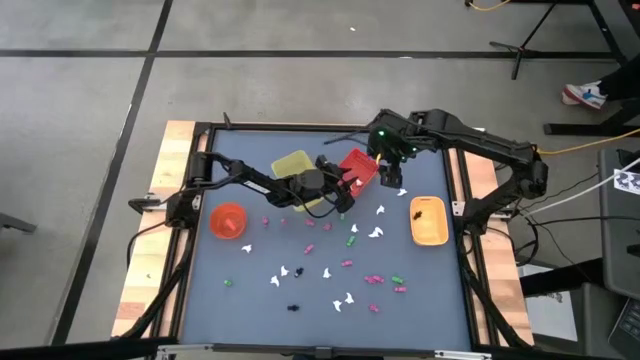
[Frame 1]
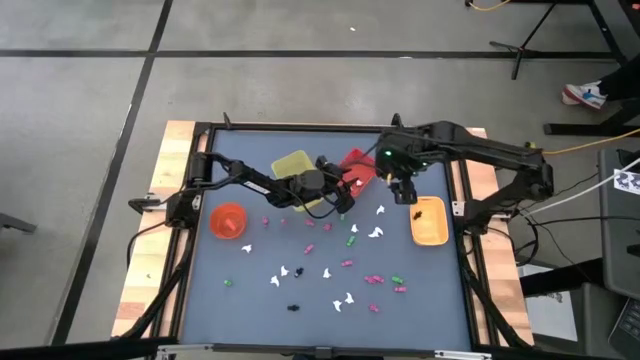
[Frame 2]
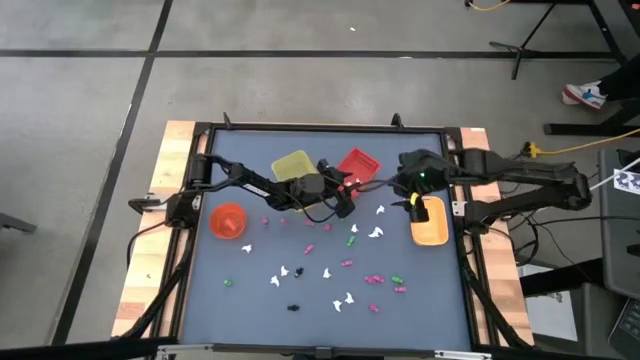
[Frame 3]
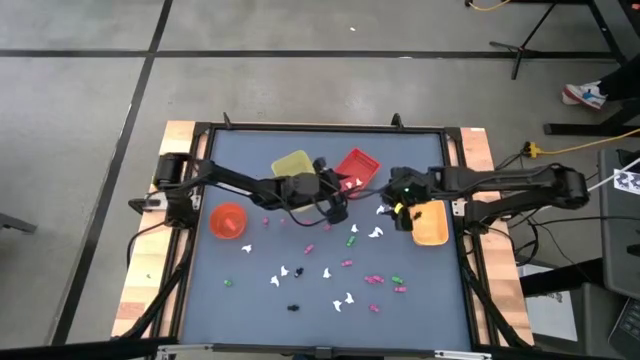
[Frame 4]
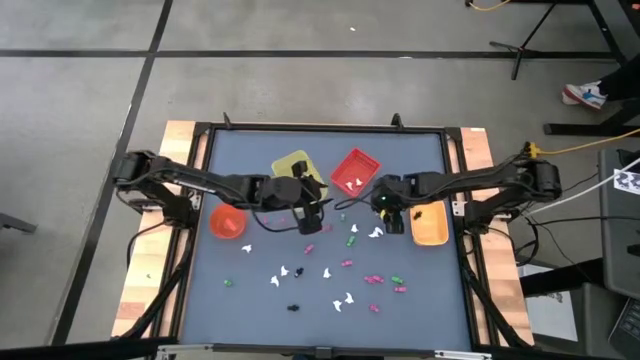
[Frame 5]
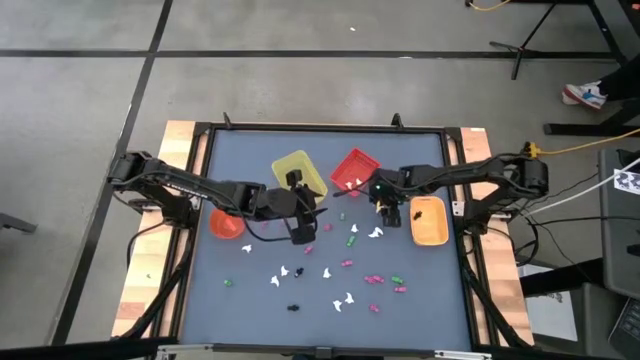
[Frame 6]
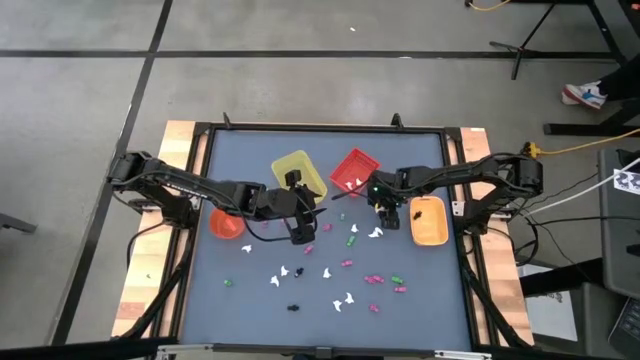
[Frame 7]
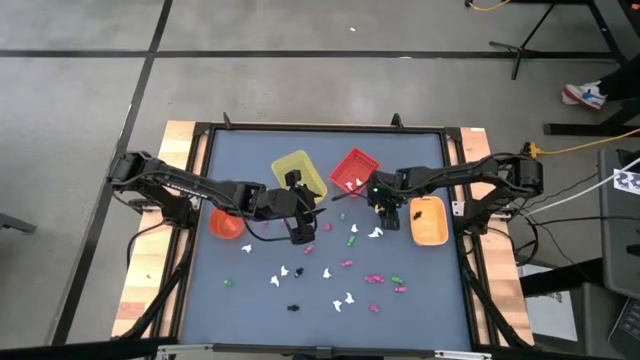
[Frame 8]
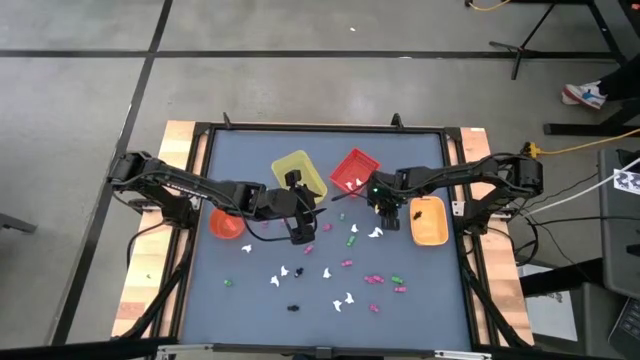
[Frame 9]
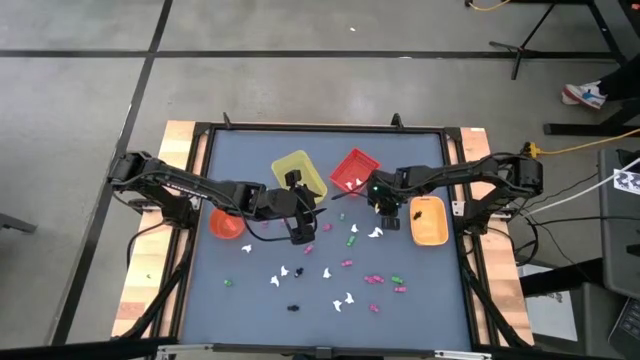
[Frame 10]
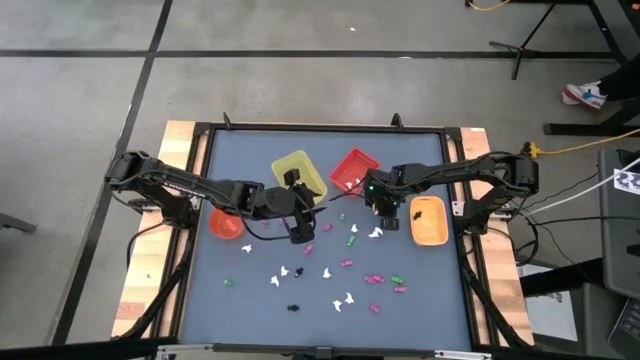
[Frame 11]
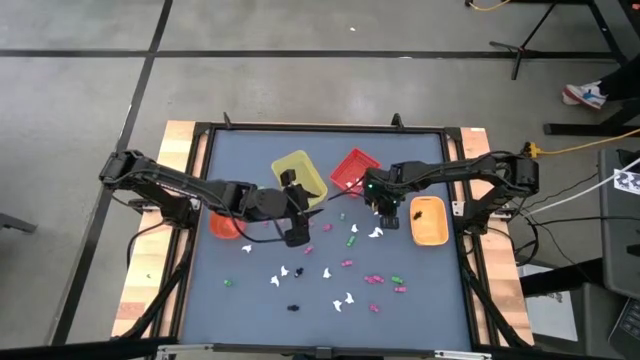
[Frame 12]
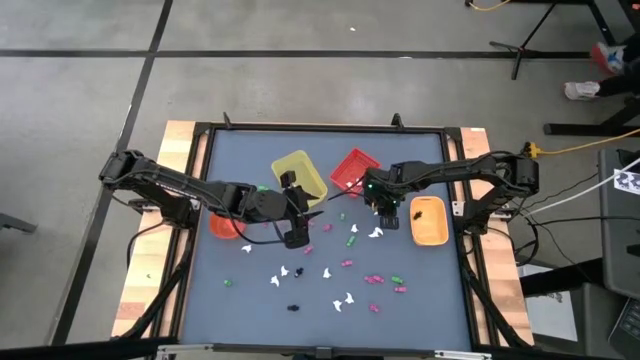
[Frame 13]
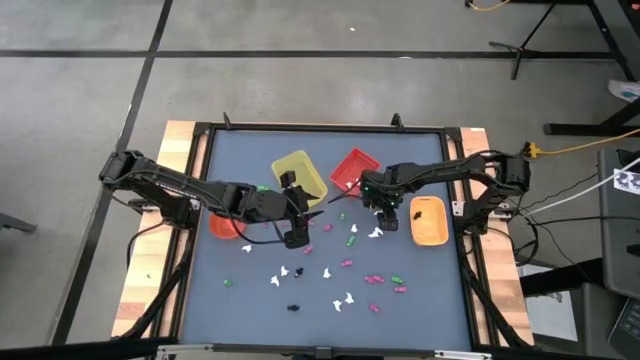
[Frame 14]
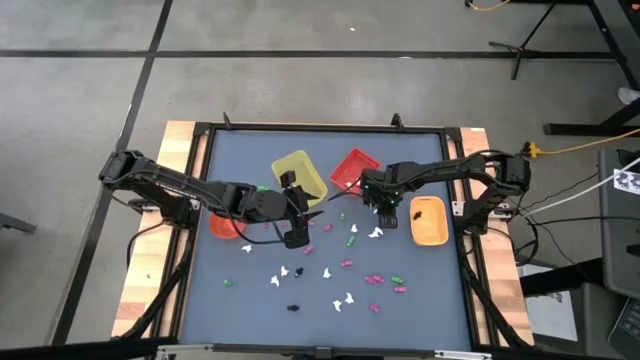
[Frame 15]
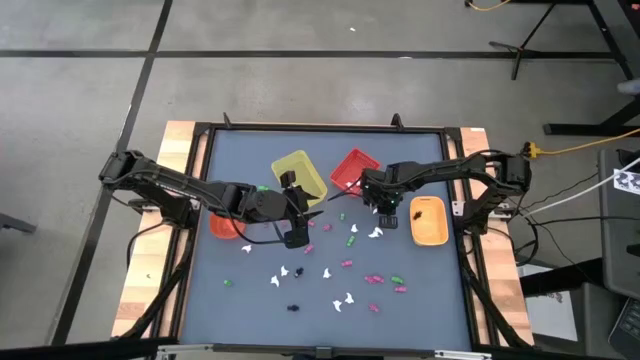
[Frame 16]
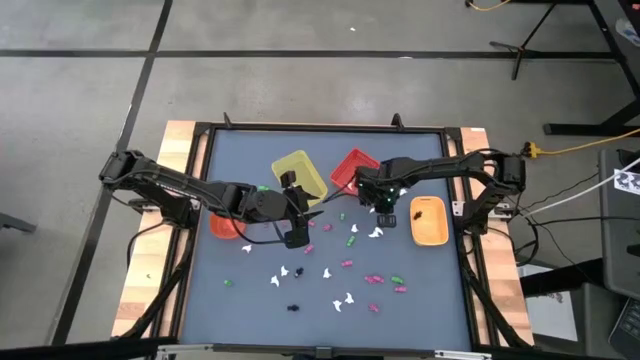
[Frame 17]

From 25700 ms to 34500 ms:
Task: Sort Halloween decoration
Put the white ghost toy into the red bin

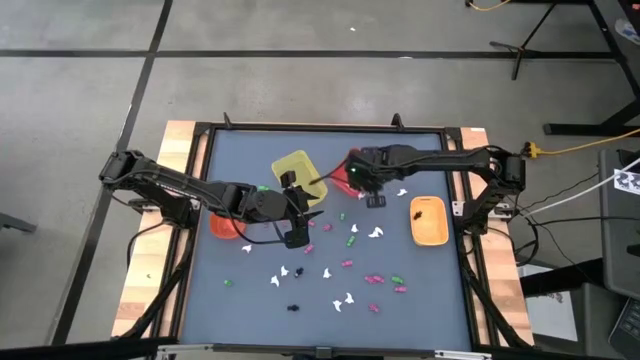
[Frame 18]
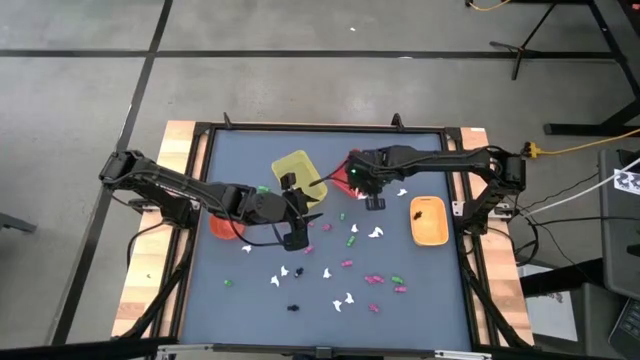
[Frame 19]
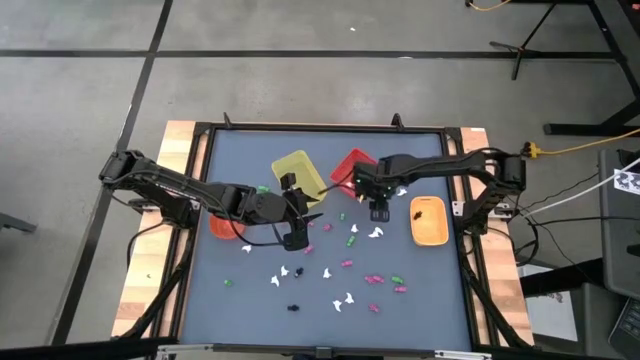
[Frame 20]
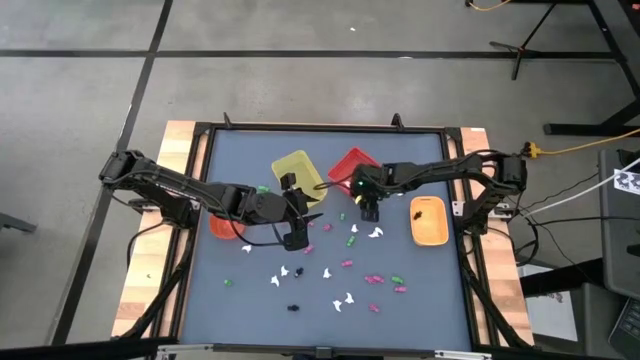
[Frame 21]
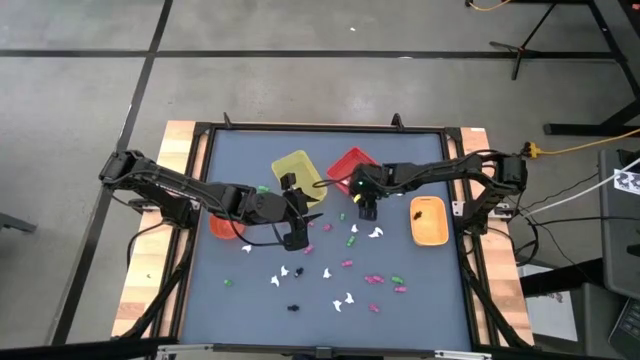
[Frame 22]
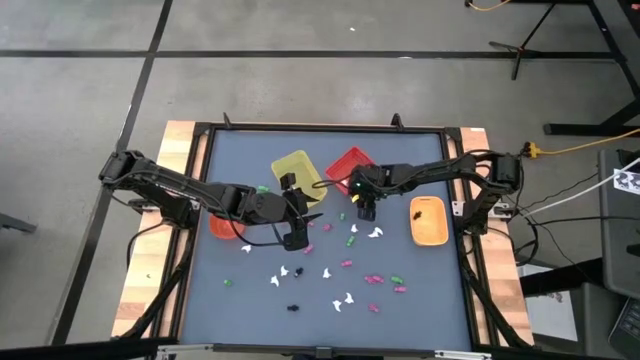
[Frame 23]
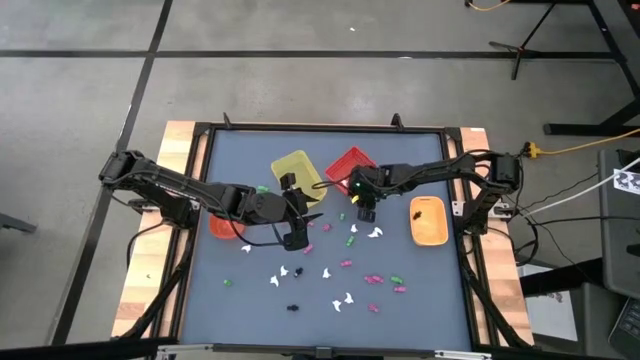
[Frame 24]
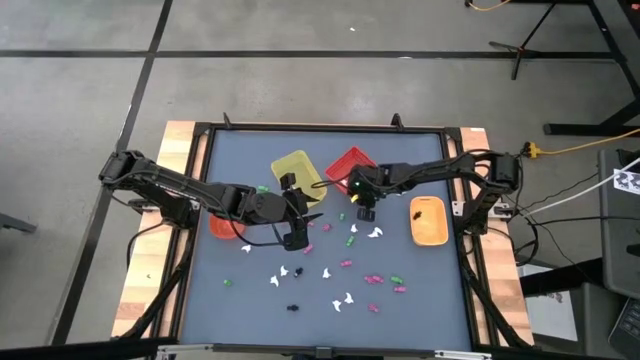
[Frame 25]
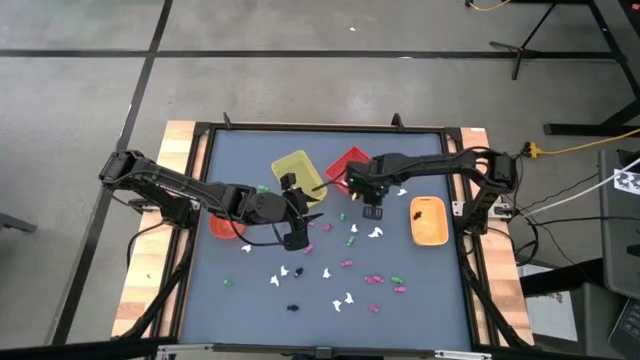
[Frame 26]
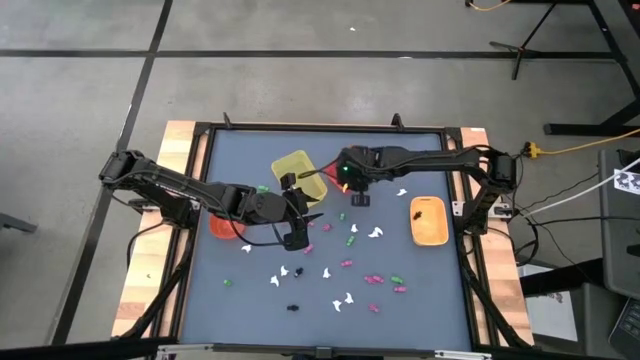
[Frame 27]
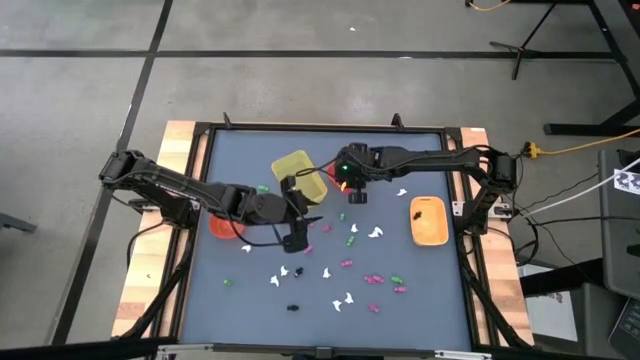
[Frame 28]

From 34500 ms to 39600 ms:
Put the white ghost toy into the red bin

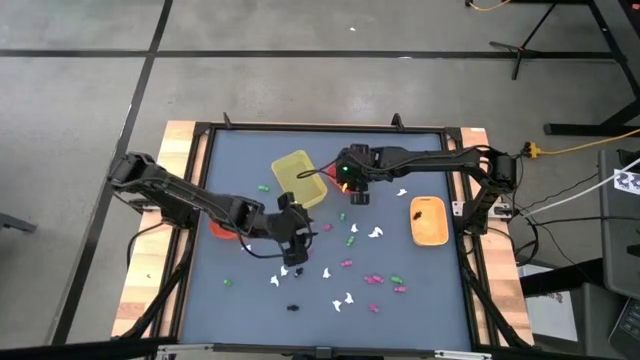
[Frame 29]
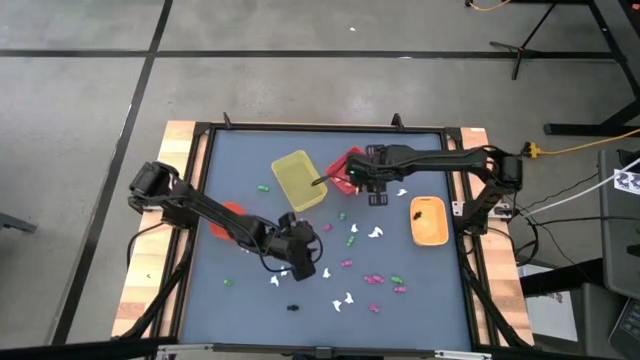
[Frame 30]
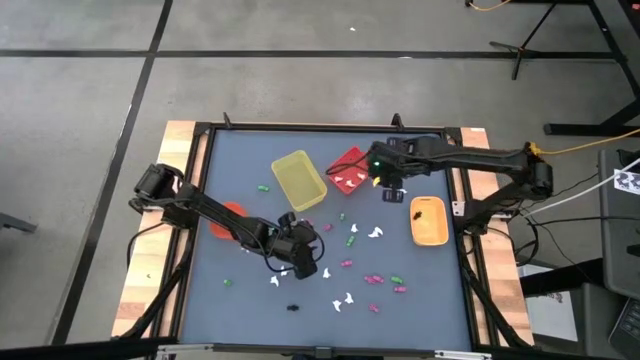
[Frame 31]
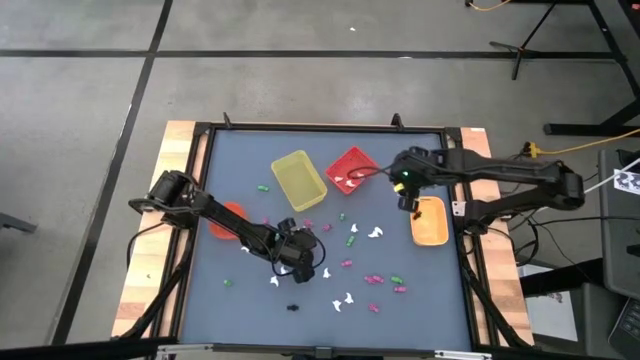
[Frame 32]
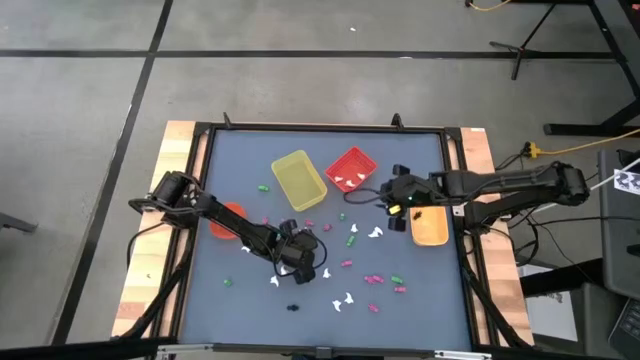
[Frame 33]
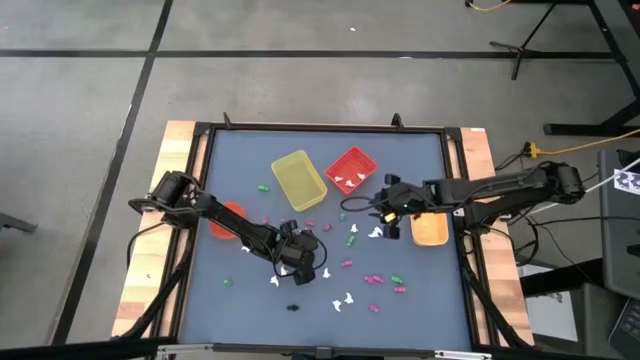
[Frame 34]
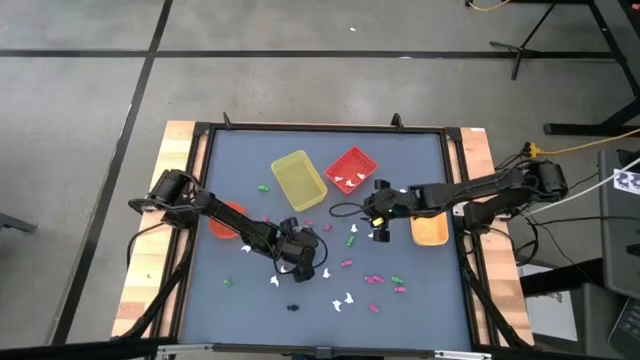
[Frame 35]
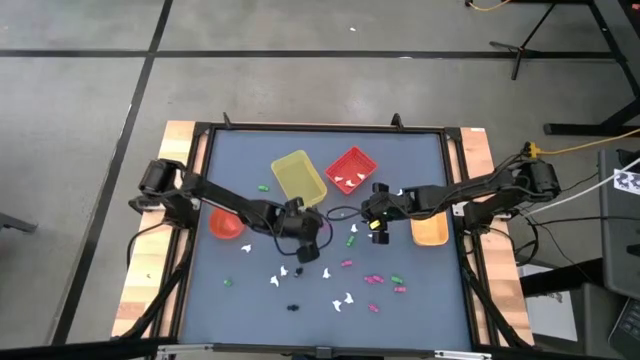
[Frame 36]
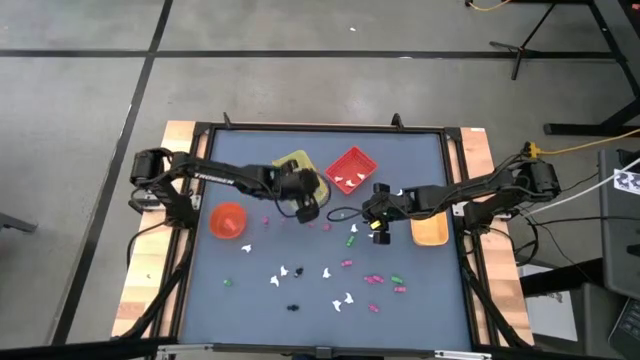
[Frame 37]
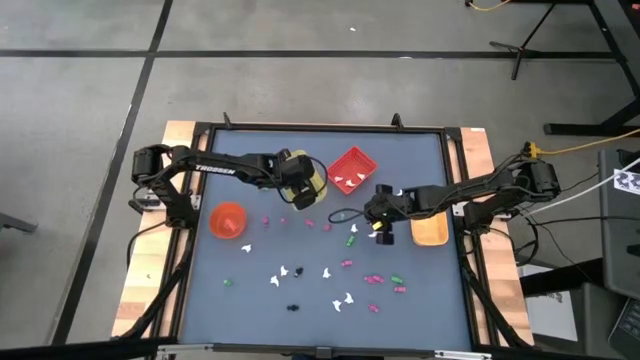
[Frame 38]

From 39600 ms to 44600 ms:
Put the pink skeleton toy into the yellow bin

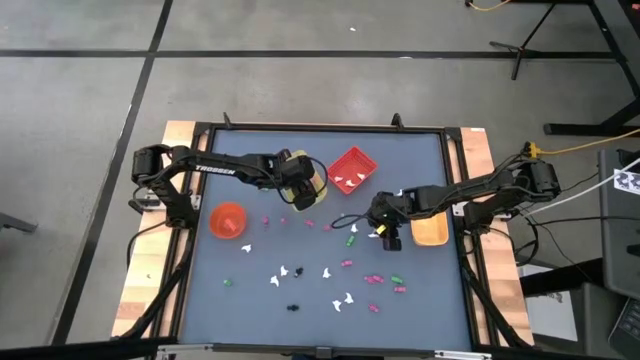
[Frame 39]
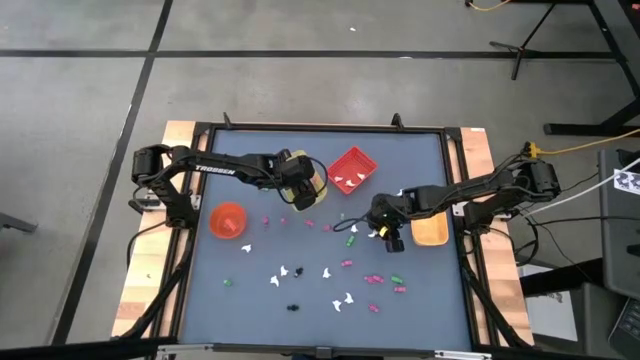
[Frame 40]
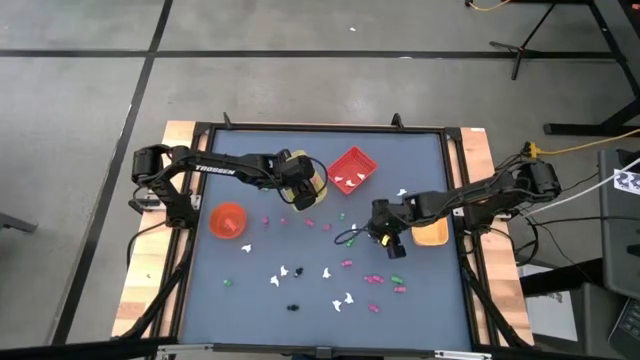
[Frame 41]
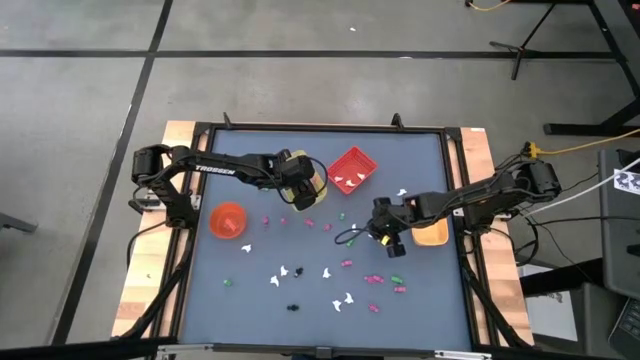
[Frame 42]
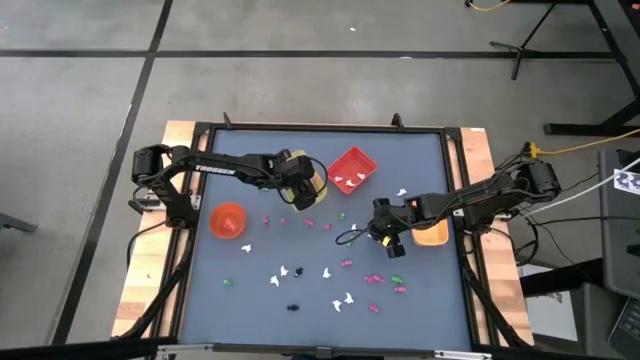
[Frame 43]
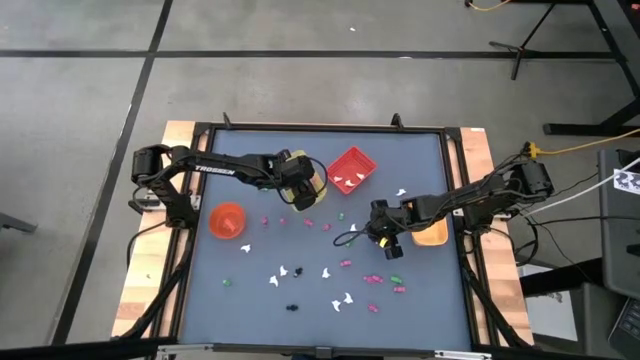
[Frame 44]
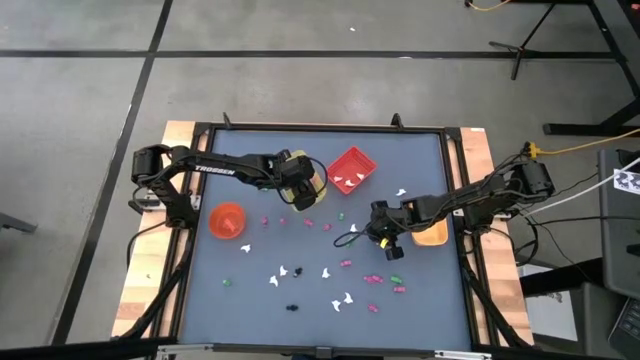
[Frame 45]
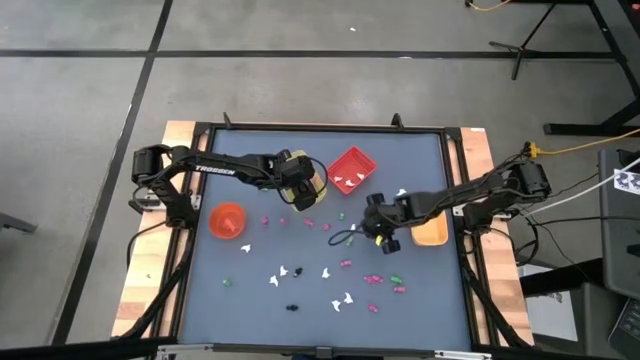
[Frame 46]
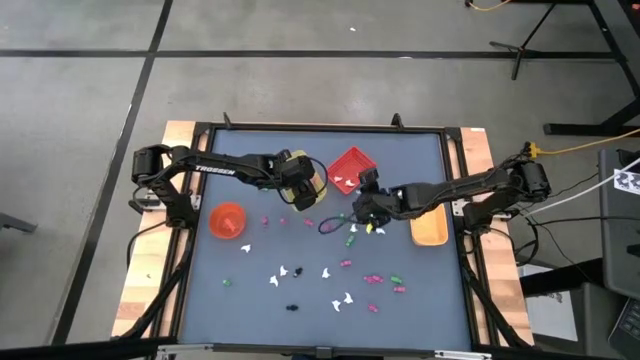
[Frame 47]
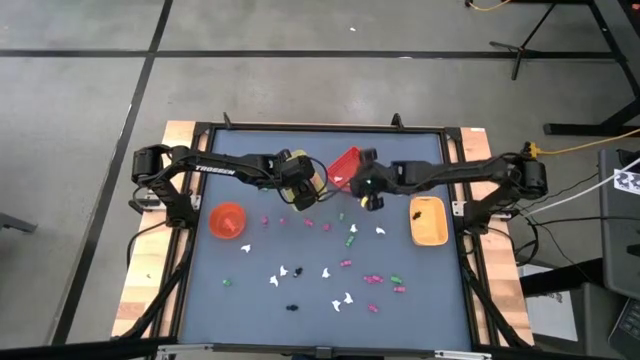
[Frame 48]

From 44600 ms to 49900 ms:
Put the white ghost toy into the red bin
